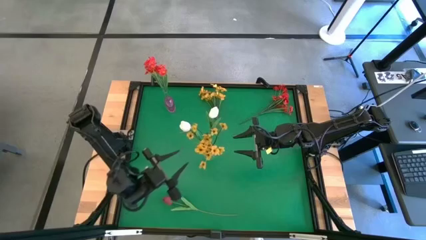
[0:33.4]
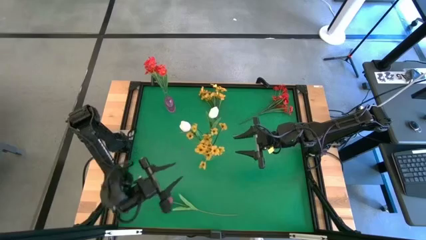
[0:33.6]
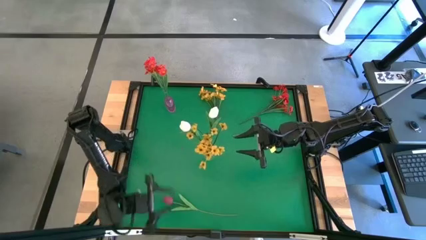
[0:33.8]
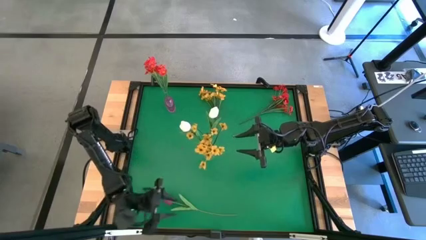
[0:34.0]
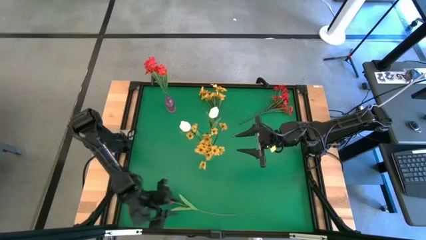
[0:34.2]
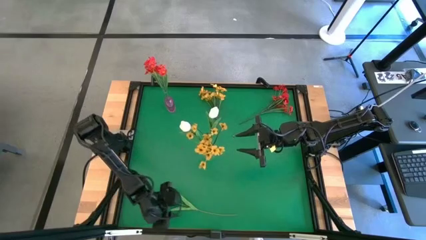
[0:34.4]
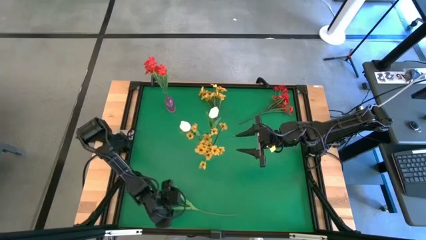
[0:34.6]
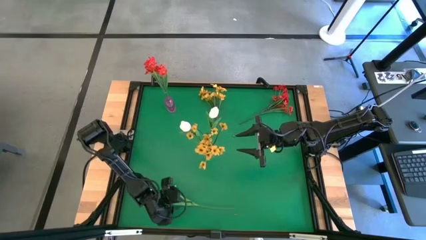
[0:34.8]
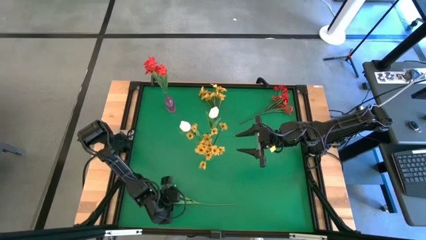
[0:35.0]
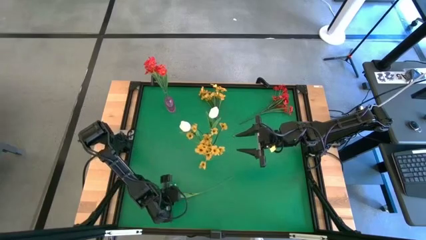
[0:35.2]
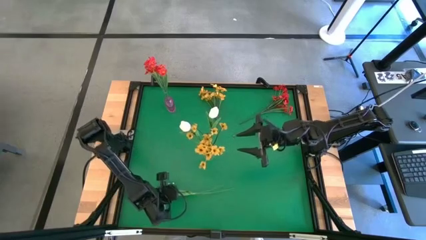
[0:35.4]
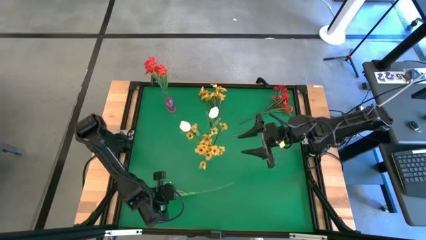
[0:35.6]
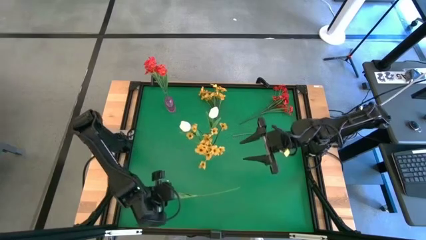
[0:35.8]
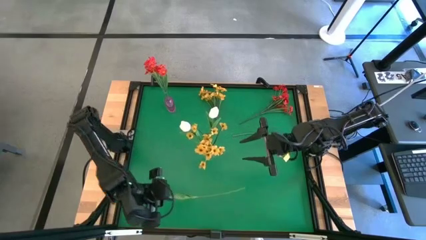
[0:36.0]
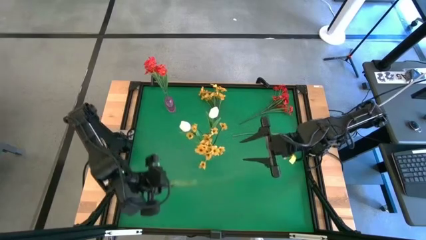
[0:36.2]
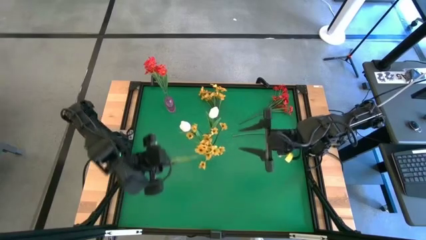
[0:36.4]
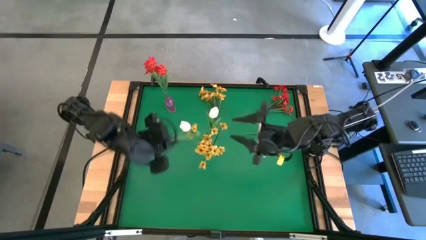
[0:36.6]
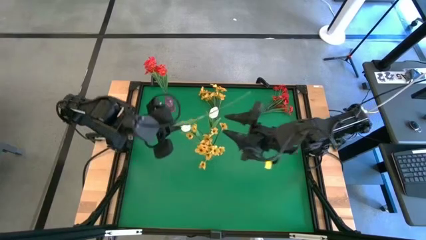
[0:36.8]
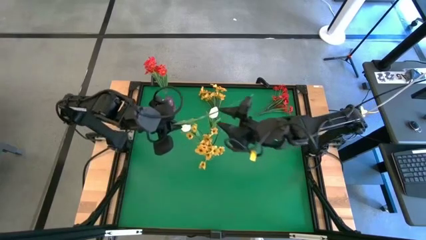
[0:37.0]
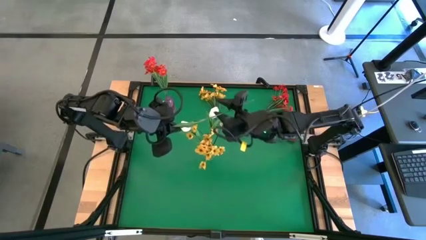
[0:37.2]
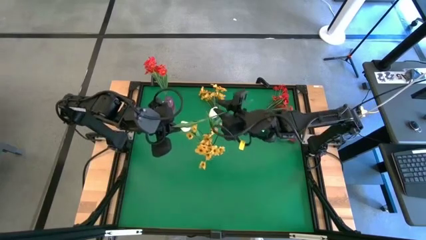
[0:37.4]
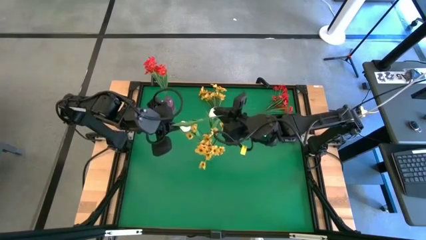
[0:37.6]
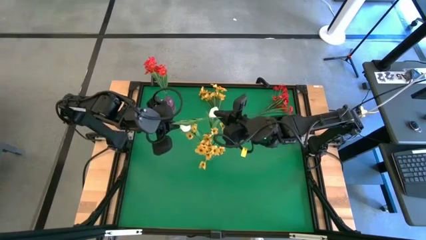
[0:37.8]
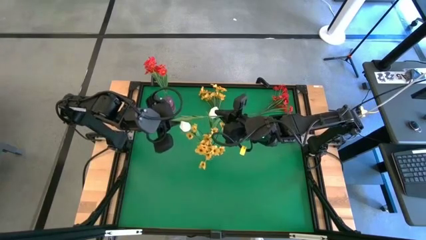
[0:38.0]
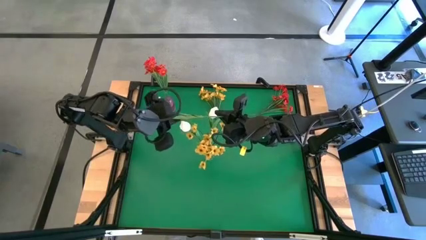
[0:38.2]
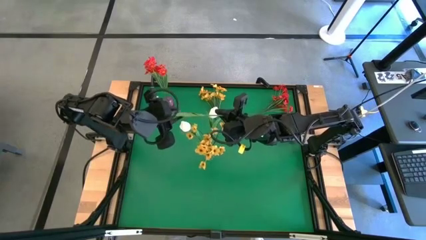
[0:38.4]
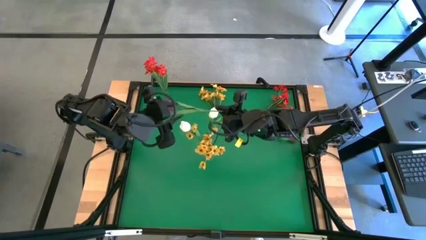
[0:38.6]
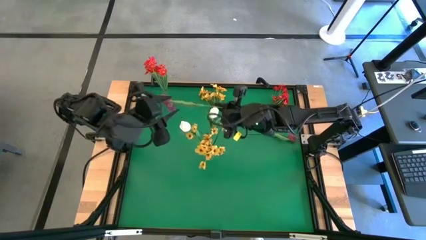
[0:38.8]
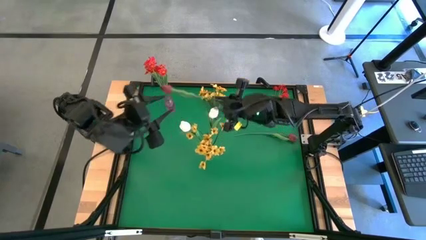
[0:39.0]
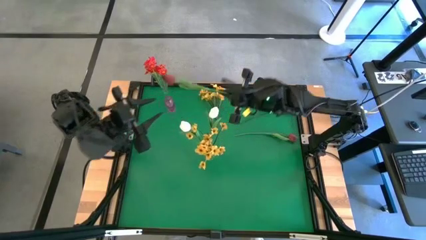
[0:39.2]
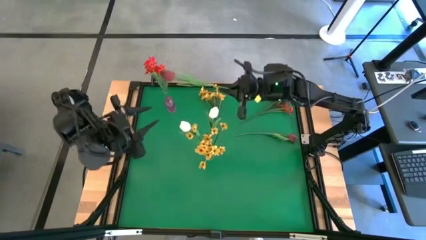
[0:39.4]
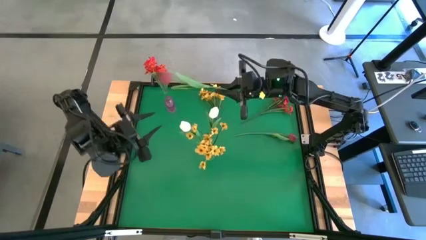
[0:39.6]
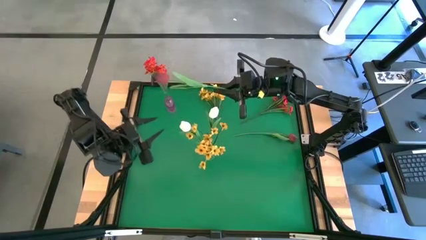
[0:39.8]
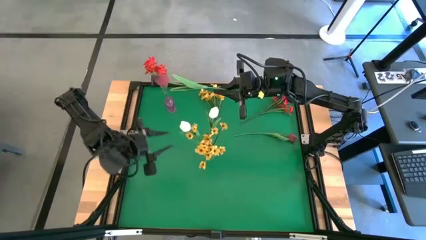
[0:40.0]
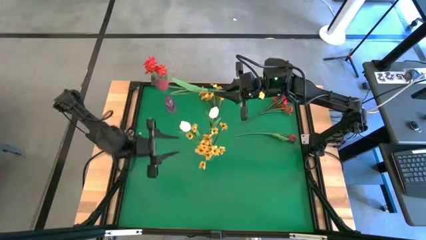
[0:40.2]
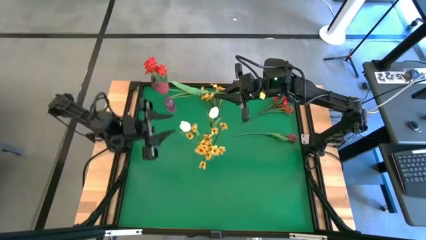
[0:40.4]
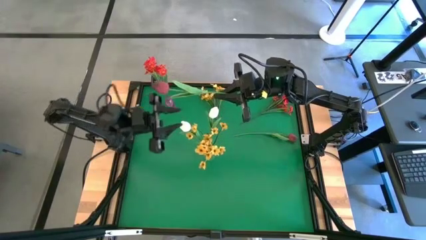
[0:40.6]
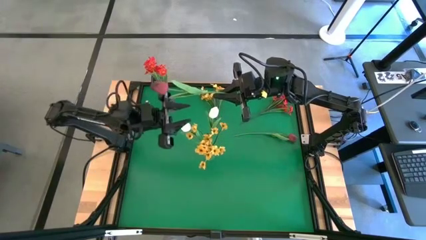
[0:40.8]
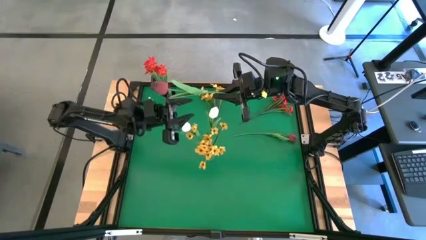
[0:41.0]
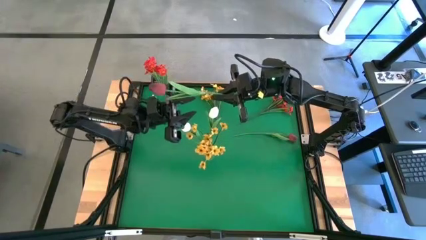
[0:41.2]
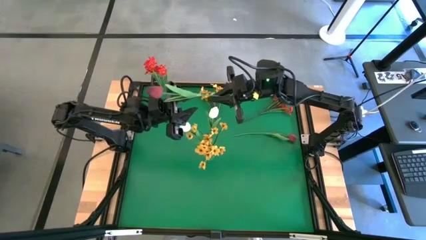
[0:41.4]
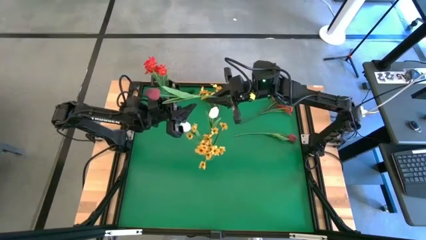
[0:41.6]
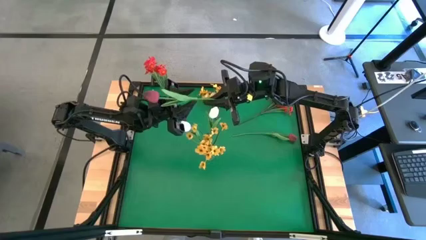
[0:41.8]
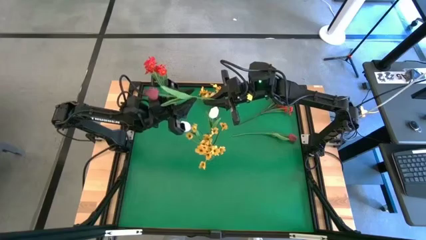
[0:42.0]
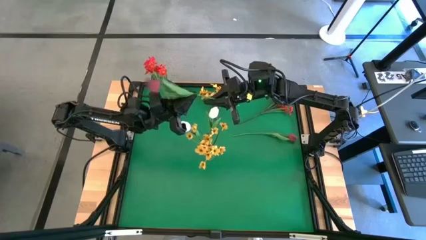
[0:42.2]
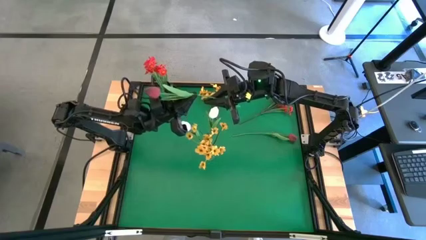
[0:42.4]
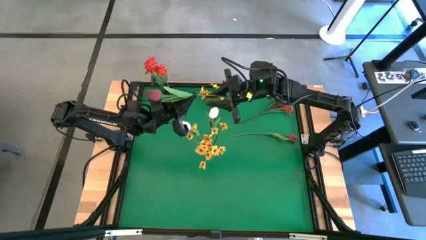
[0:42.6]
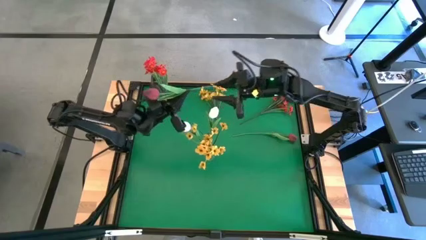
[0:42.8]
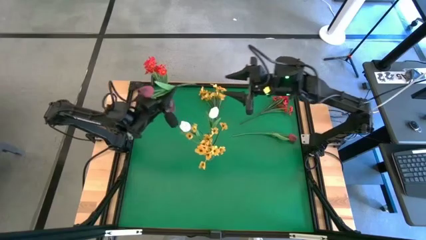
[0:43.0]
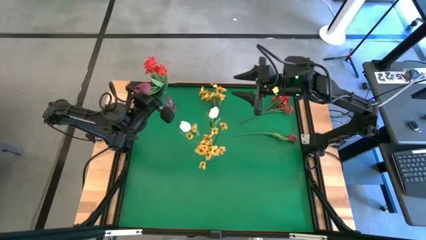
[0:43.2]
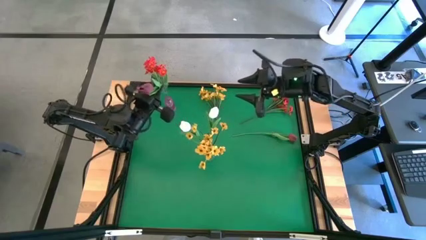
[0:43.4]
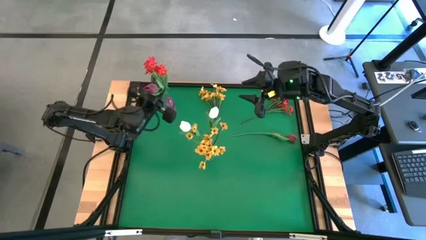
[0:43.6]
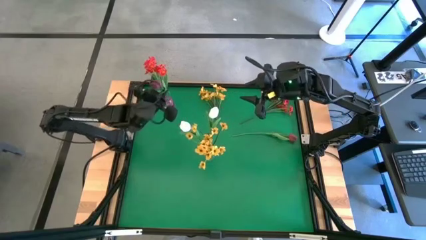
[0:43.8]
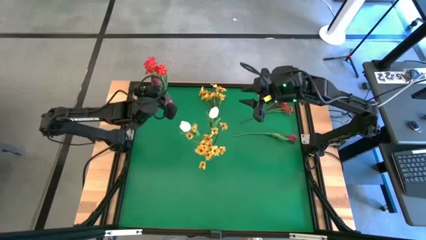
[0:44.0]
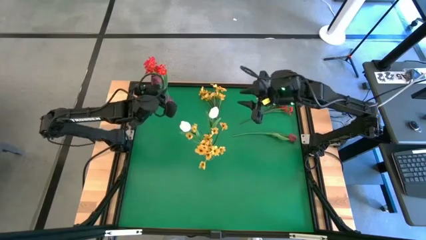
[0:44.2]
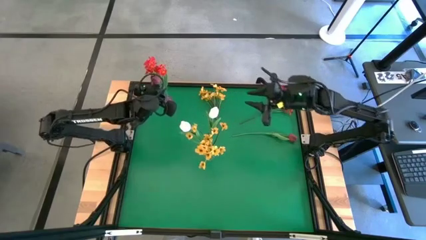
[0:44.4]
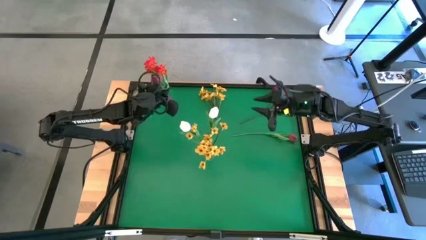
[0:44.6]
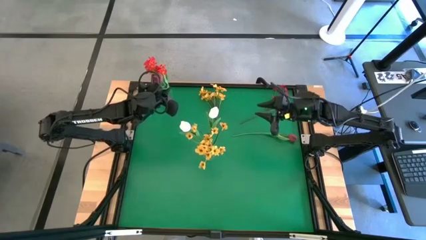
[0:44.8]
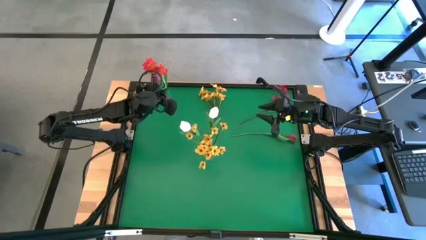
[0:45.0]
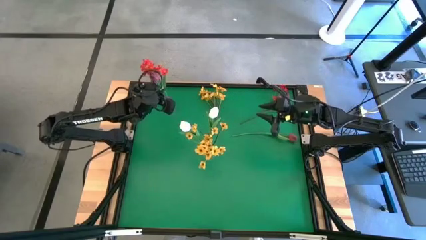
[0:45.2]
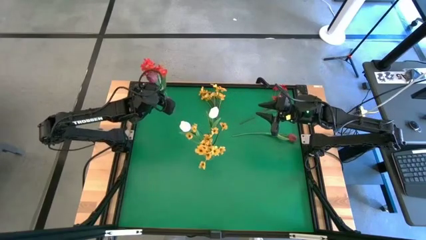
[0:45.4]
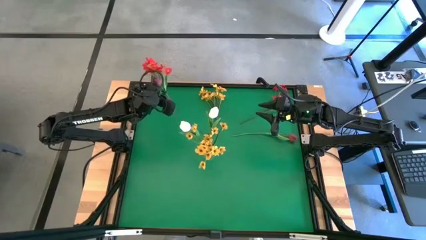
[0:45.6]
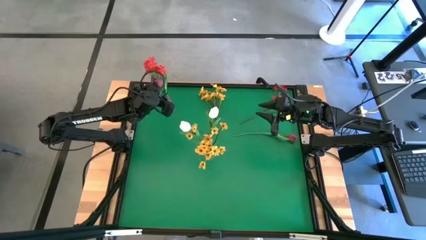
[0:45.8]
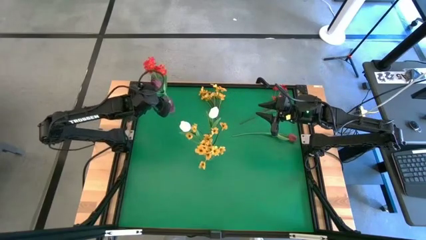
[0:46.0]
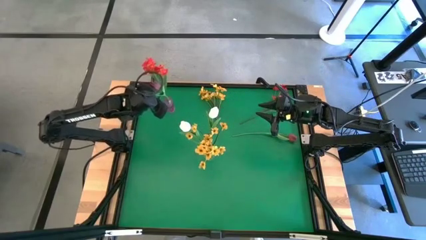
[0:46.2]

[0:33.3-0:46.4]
Task: Sort flowers into vase by color
Put the bottom red tulip into the pink vase

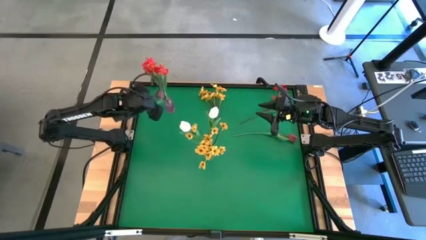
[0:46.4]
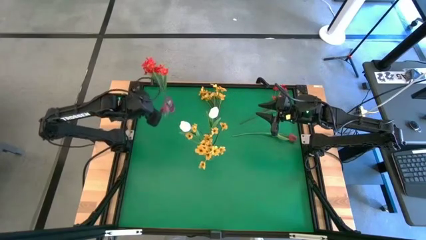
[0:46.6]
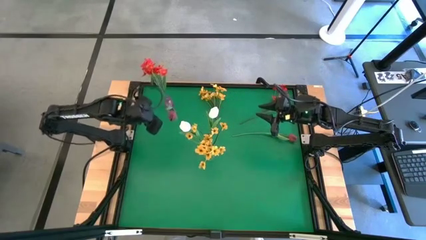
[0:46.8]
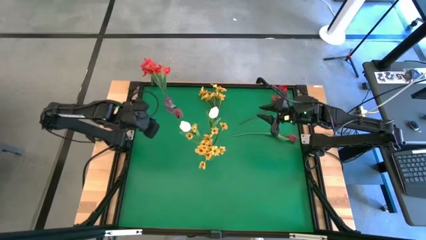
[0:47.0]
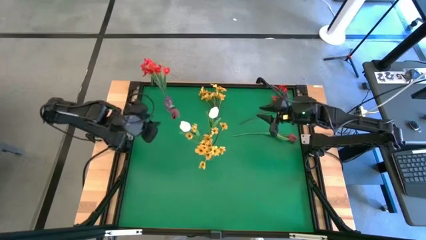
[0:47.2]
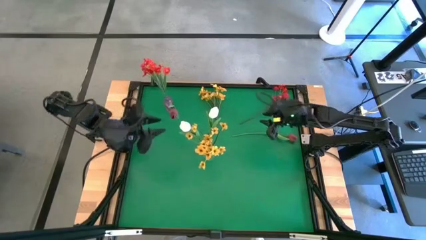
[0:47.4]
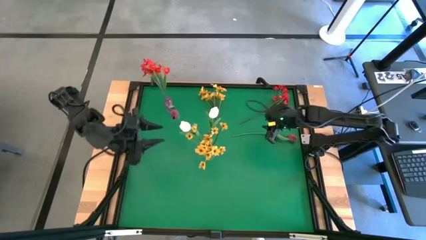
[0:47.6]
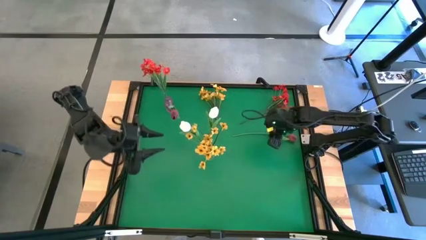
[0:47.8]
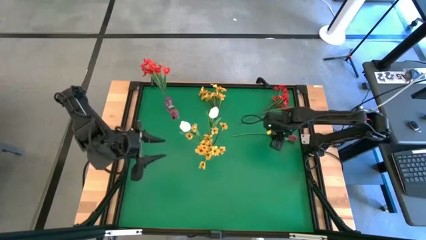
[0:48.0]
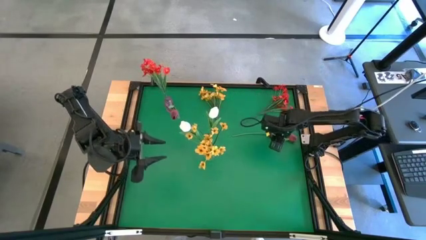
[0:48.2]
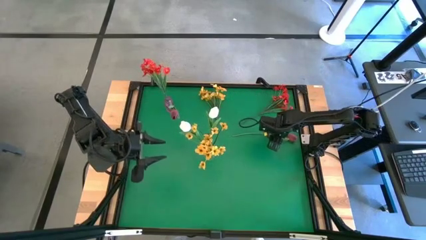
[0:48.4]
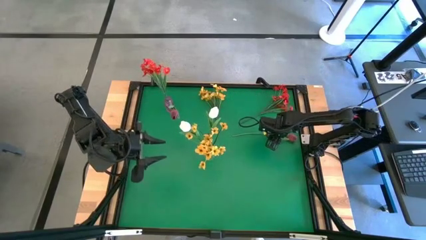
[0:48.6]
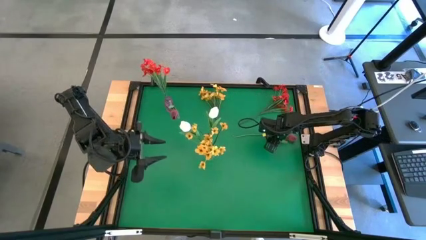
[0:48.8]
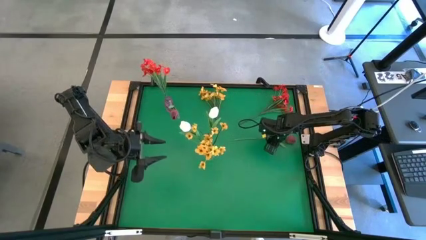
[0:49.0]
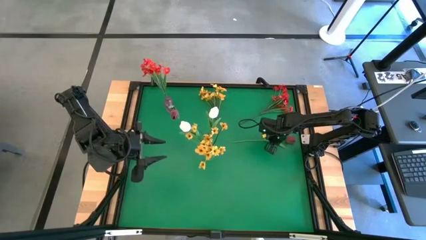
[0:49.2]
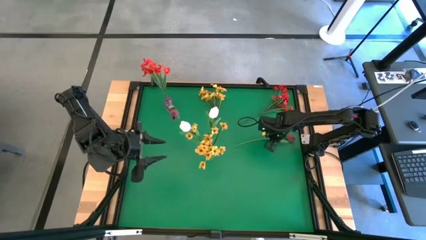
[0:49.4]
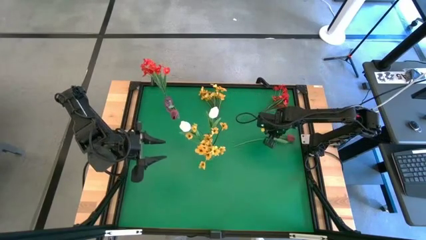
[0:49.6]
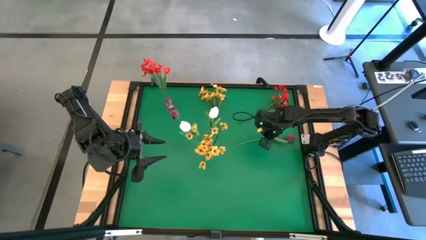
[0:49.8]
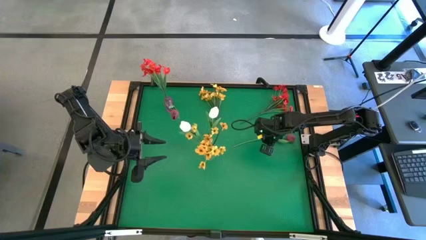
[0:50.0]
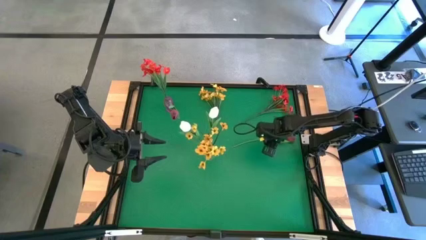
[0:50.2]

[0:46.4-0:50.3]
Put the dark red tulip into the pink vase
